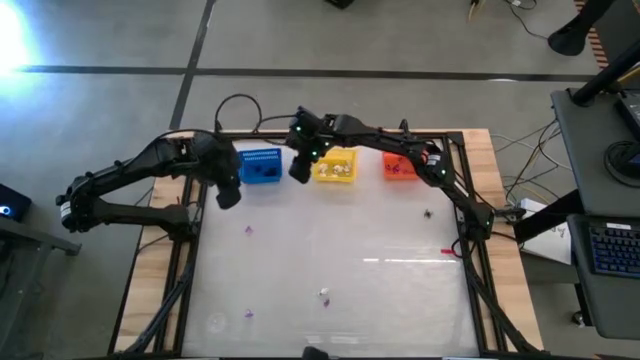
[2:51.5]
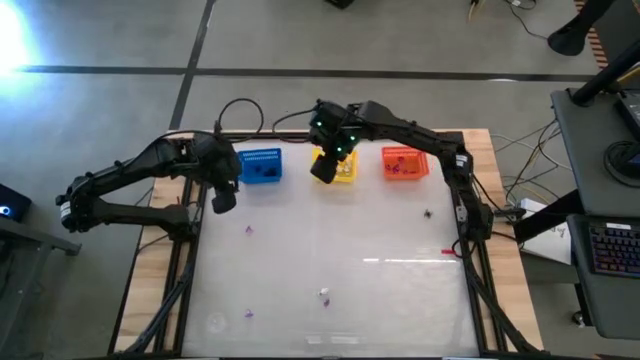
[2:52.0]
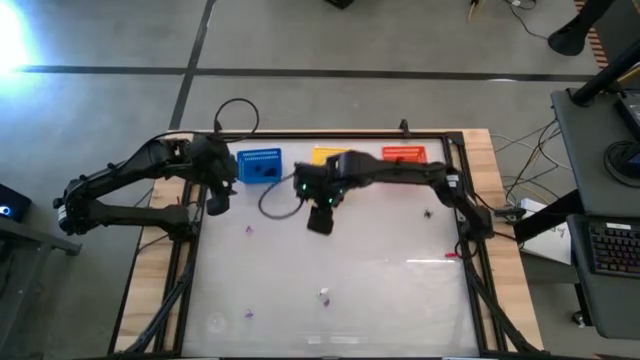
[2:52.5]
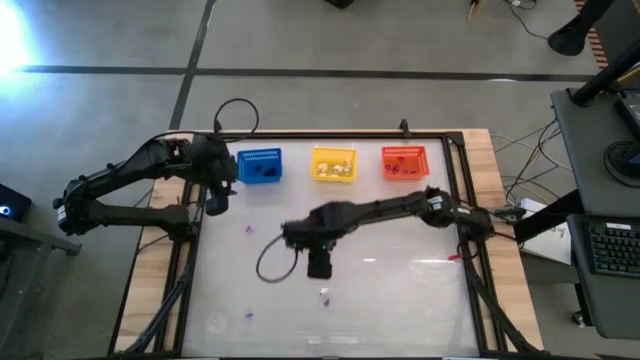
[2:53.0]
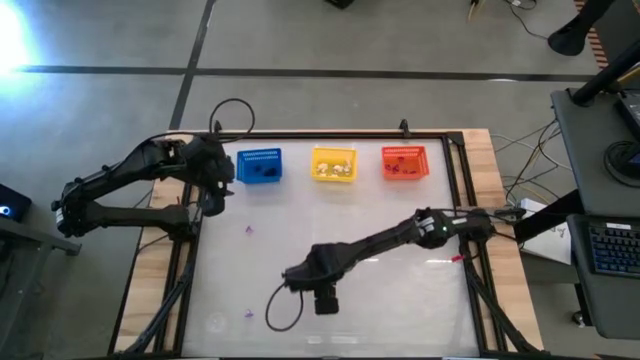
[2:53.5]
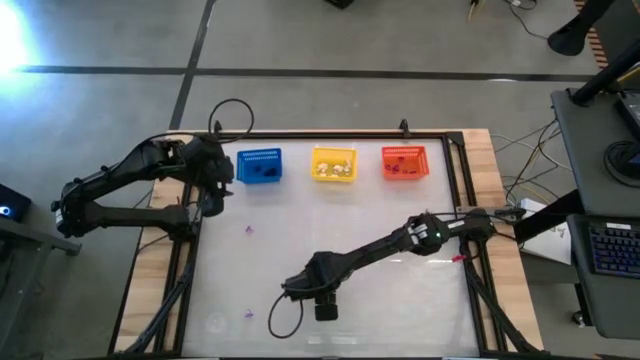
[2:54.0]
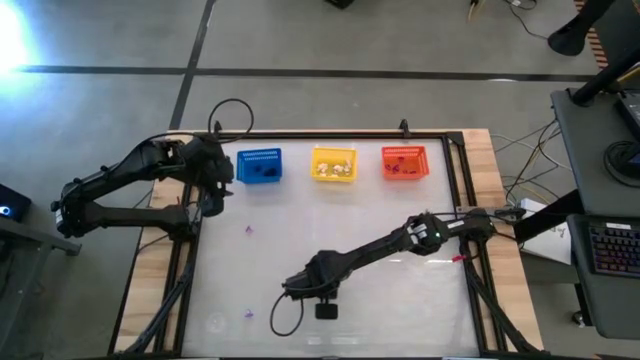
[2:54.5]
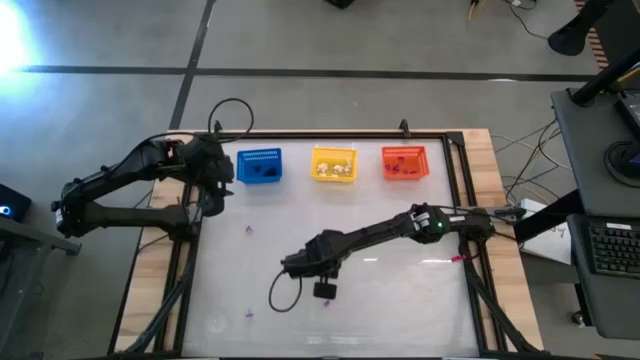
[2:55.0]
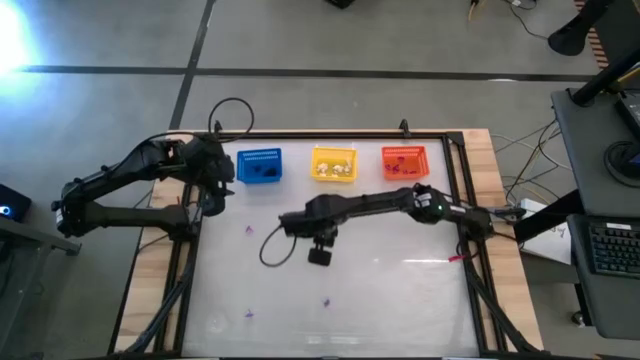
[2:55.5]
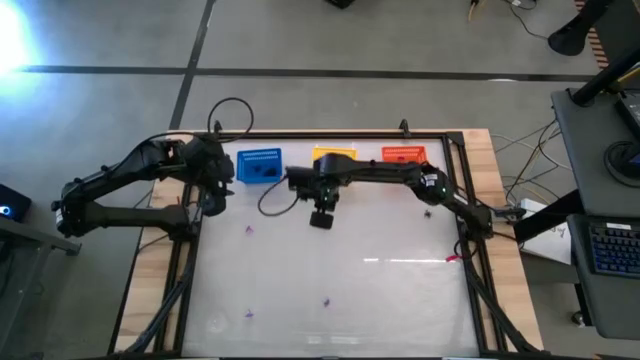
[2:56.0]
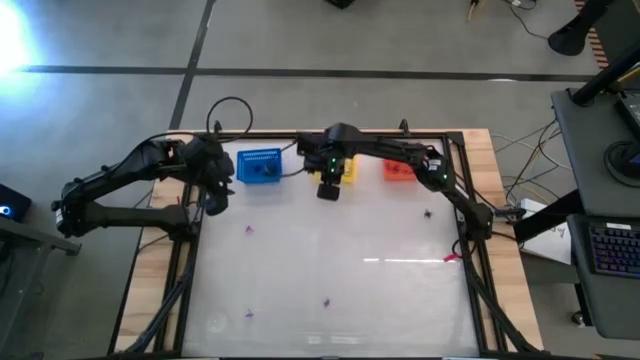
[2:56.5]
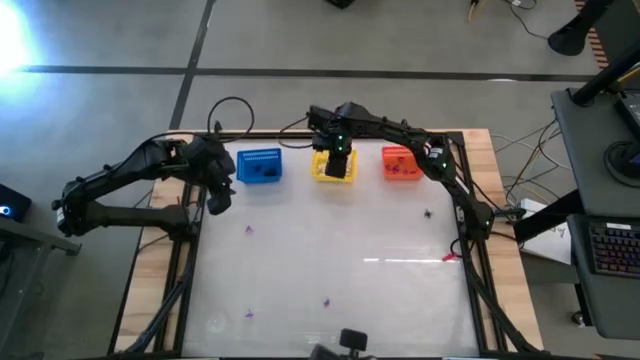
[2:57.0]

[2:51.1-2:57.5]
Task: Sort Halloween decoration
Put the white skeleton toy into the yellow bin

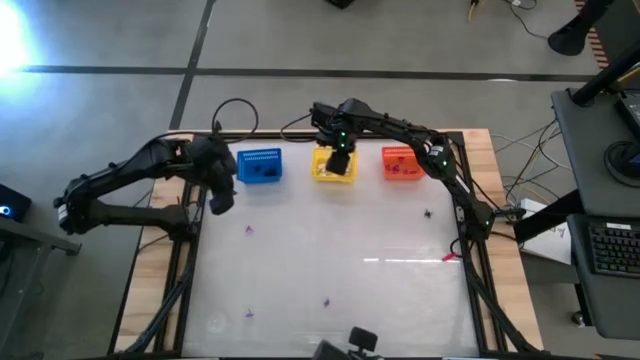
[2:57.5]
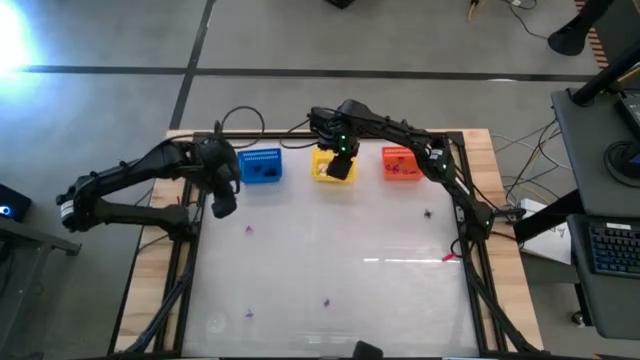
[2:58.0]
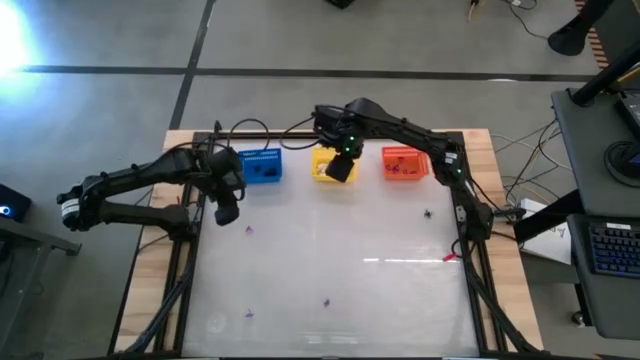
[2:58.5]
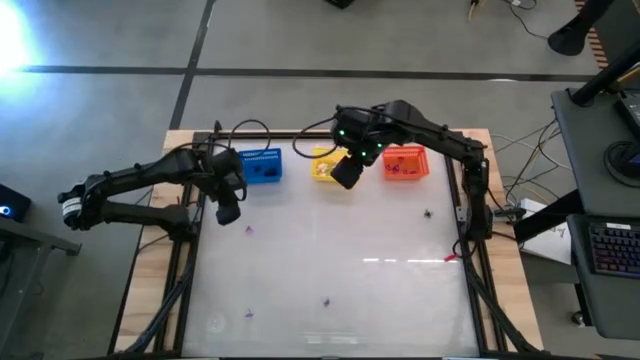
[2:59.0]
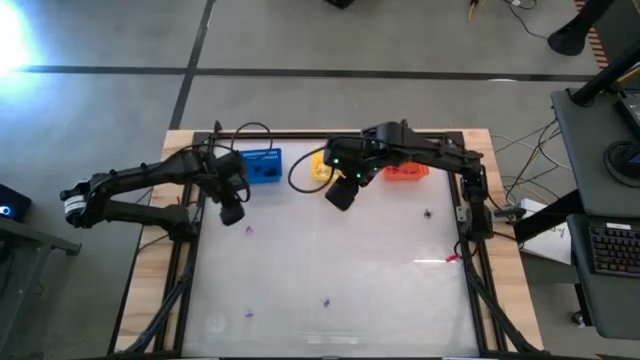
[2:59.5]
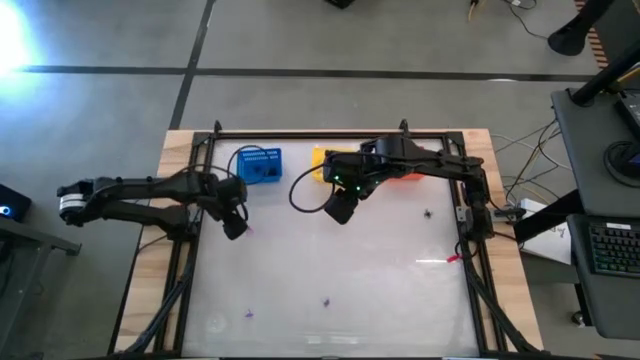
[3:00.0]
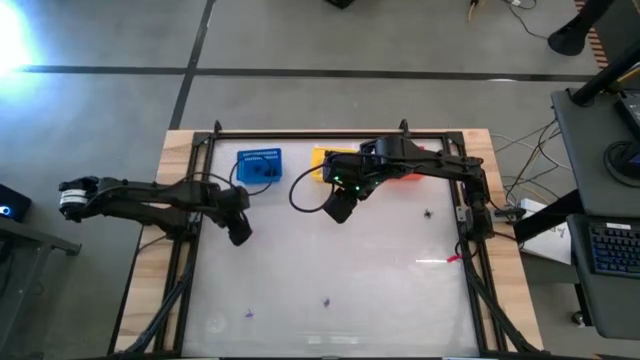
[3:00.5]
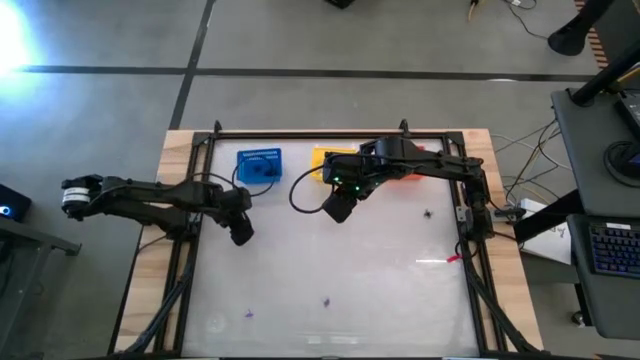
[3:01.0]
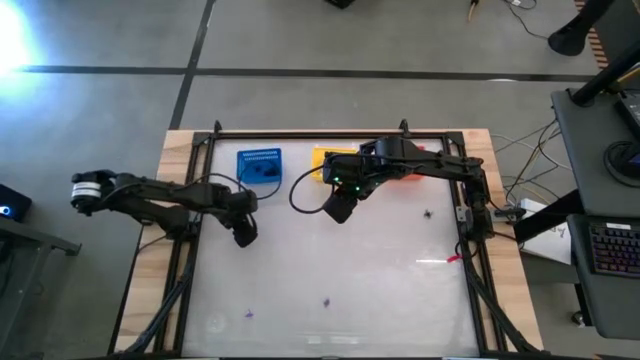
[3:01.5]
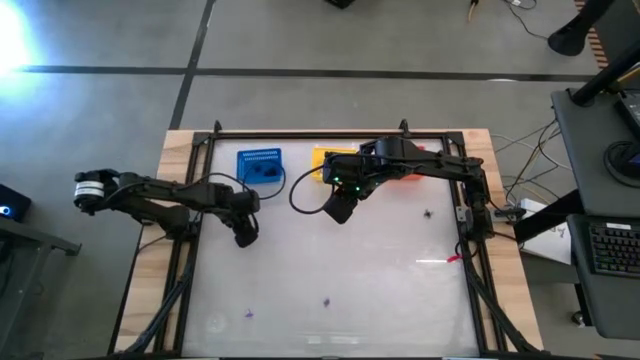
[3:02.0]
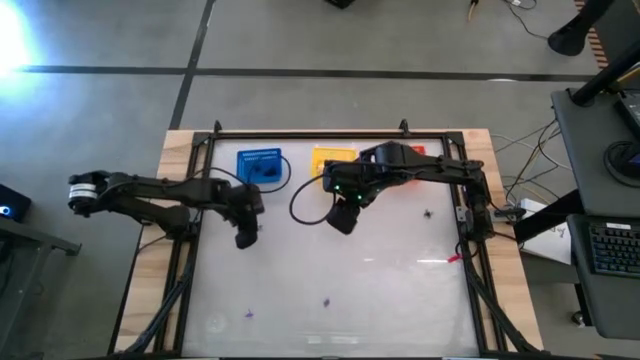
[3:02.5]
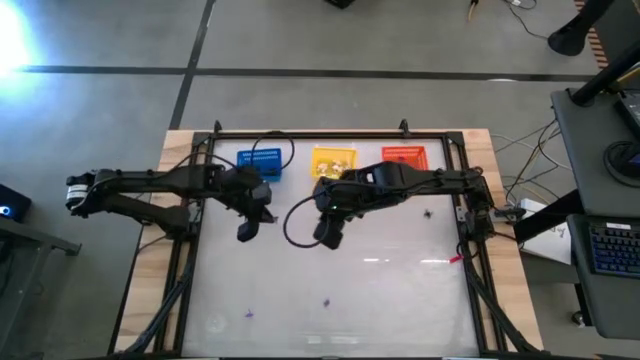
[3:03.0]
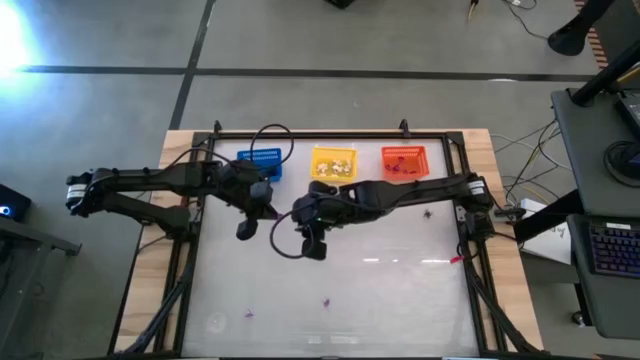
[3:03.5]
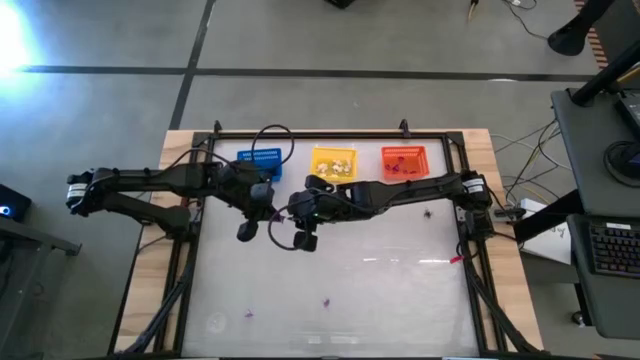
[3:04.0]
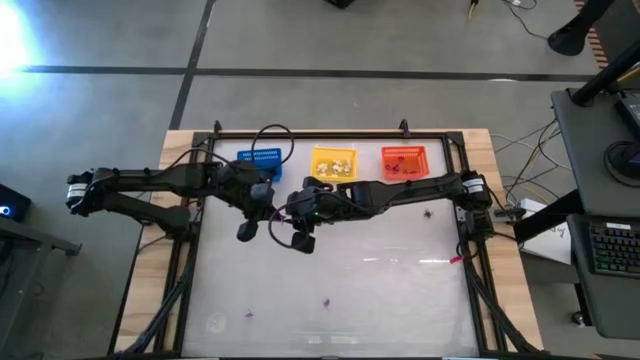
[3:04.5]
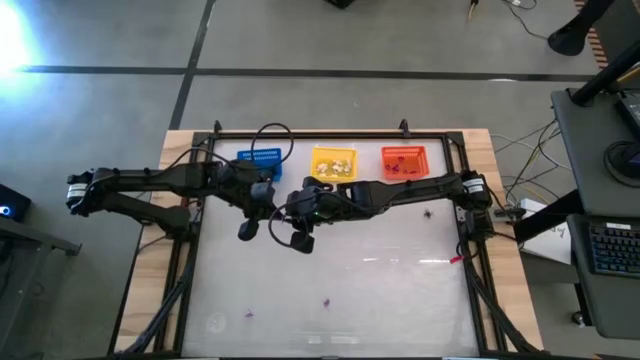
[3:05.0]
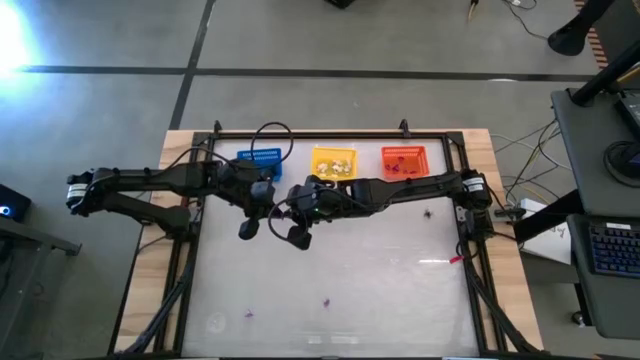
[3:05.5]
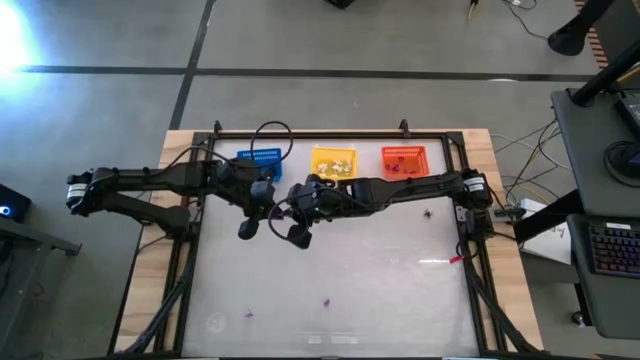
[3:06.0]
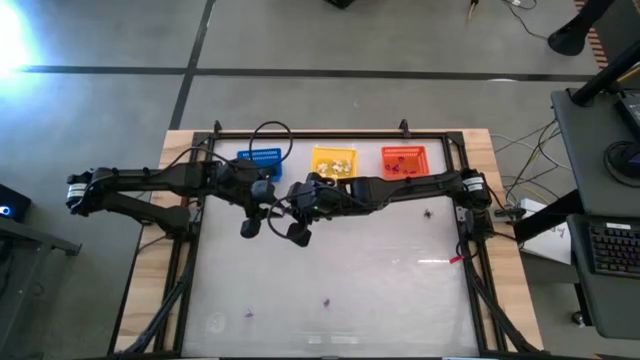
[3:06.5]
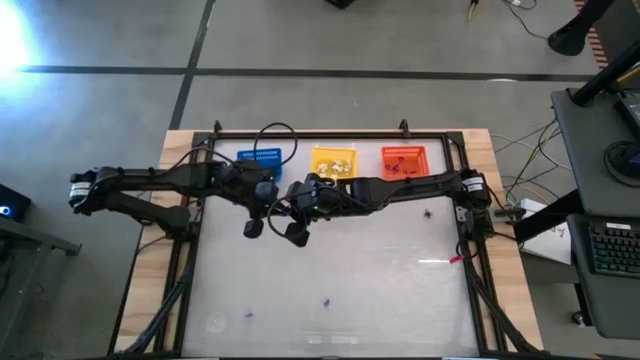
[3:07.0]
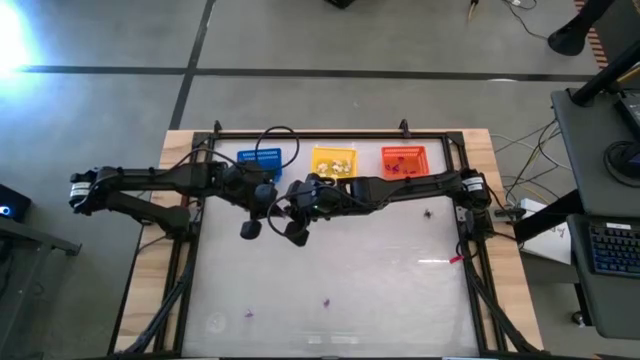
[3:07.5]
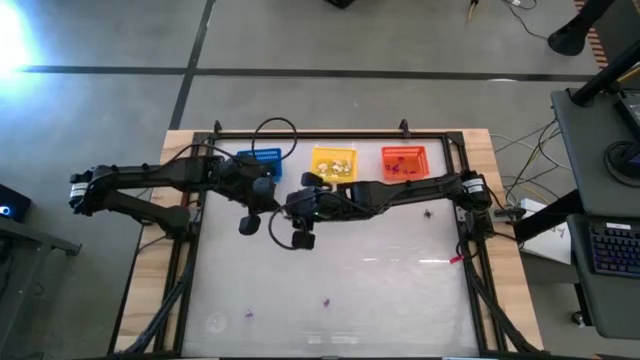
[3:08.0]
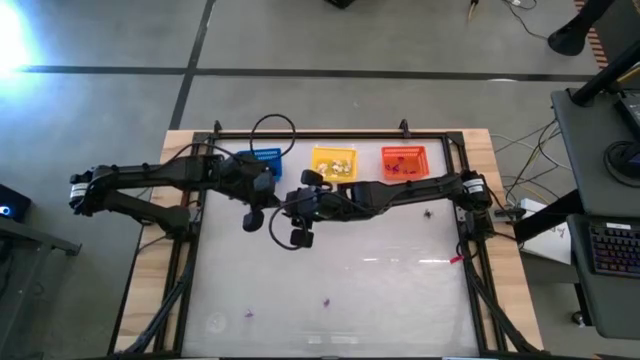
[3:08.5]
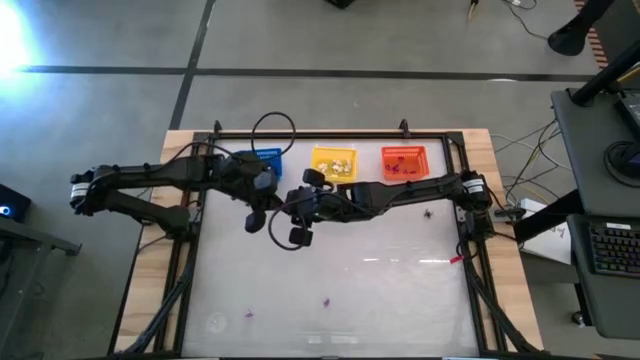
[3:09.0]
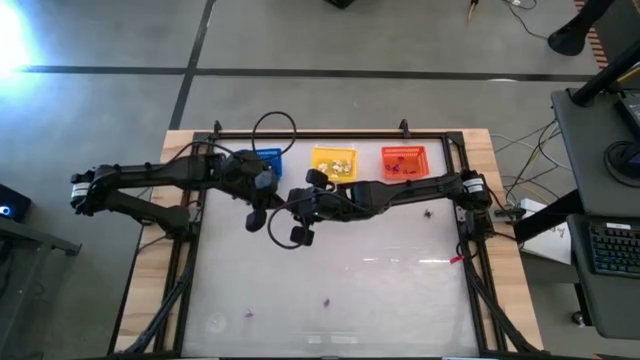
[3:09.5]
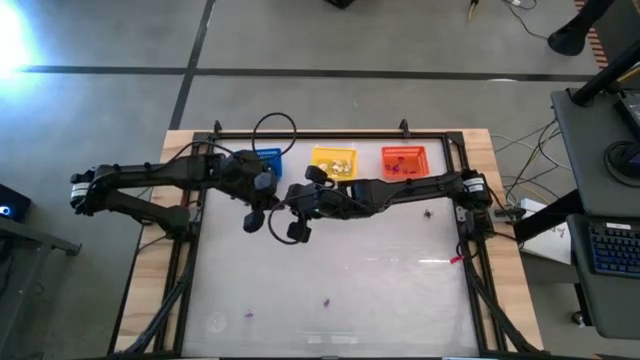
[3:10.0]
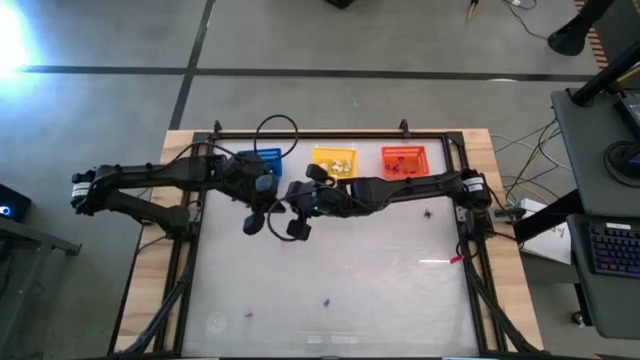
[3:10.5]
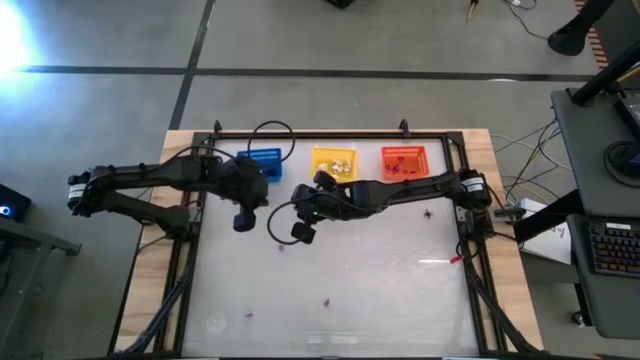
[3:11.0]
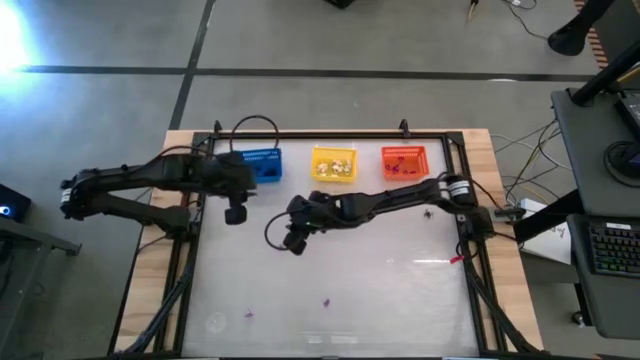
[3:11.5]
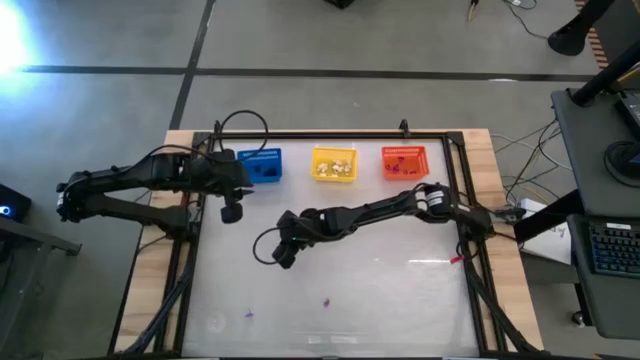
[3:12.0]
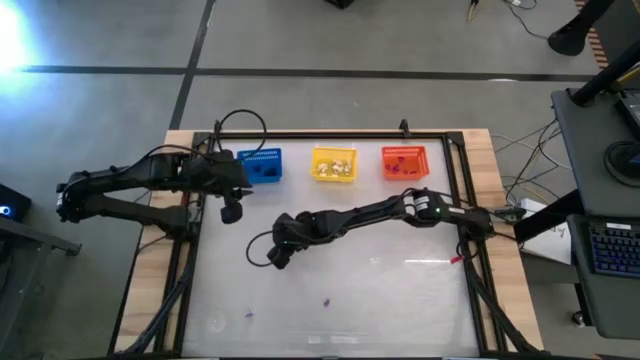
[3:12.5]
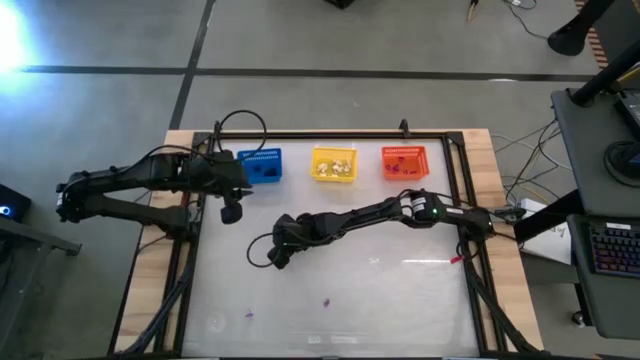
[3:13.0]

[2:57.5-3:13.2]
Put the purple hat toy into the orange bin
